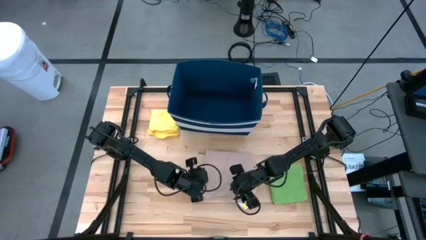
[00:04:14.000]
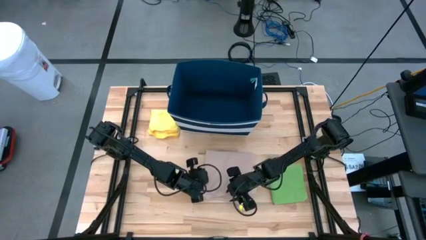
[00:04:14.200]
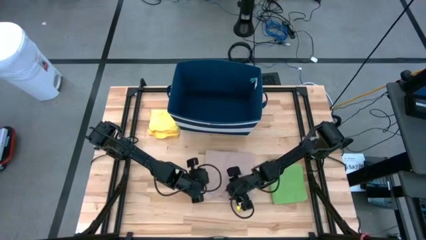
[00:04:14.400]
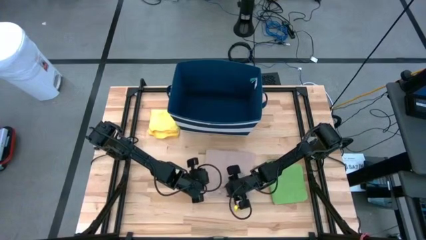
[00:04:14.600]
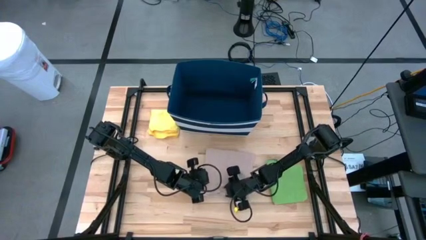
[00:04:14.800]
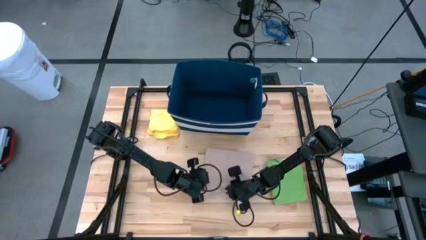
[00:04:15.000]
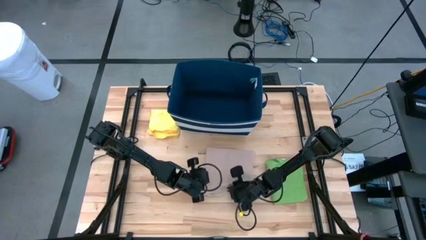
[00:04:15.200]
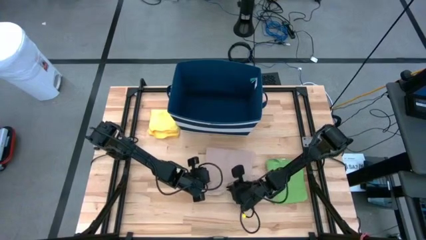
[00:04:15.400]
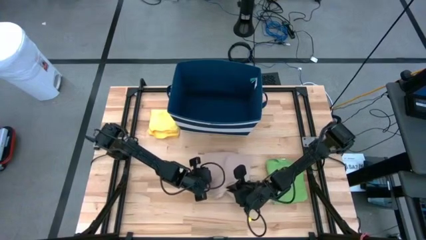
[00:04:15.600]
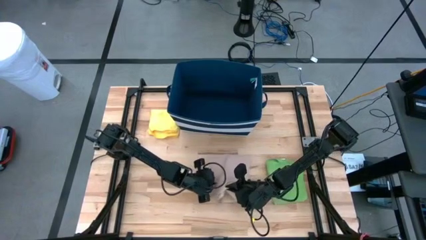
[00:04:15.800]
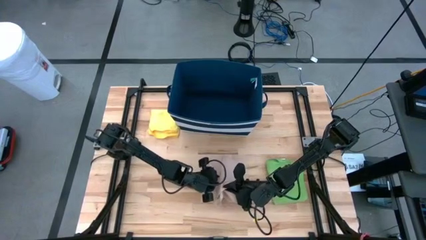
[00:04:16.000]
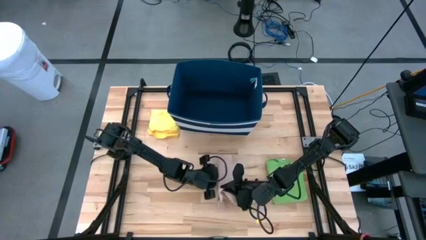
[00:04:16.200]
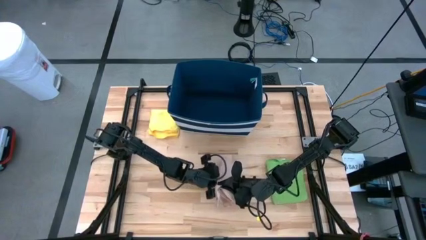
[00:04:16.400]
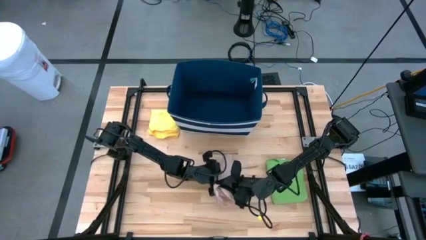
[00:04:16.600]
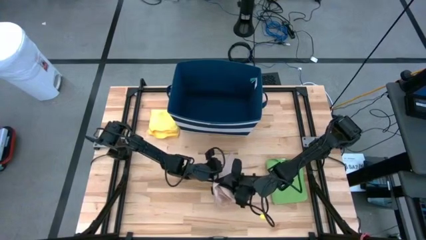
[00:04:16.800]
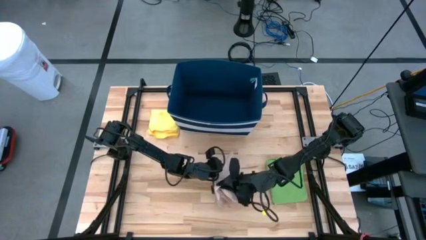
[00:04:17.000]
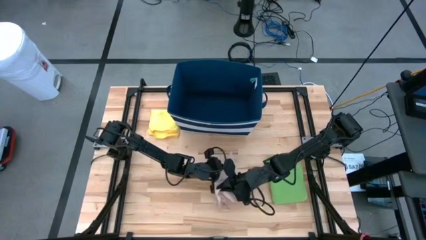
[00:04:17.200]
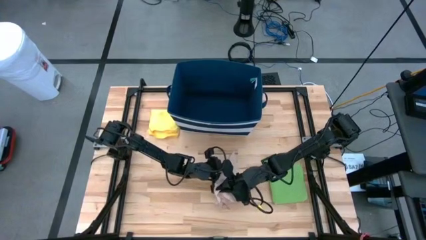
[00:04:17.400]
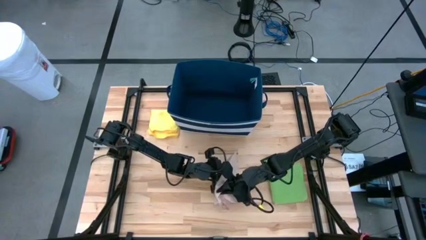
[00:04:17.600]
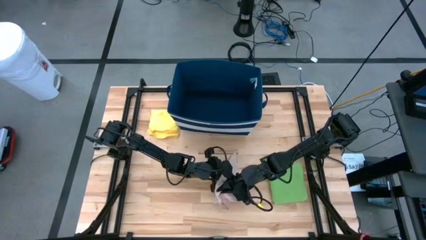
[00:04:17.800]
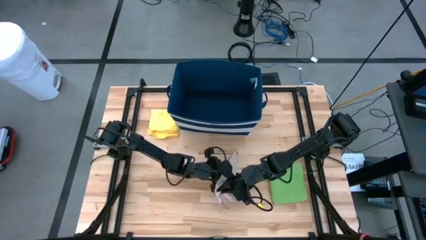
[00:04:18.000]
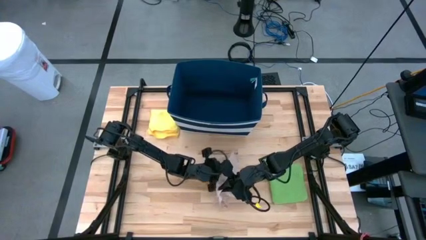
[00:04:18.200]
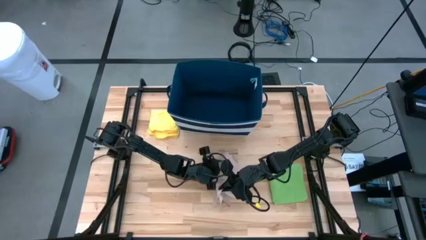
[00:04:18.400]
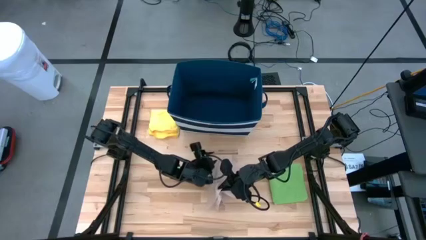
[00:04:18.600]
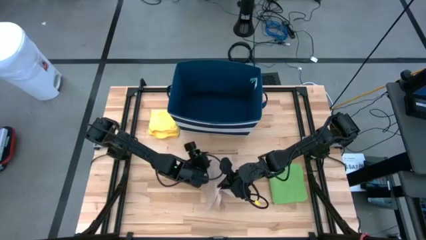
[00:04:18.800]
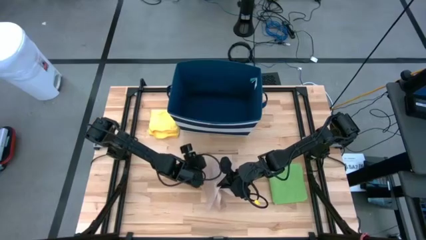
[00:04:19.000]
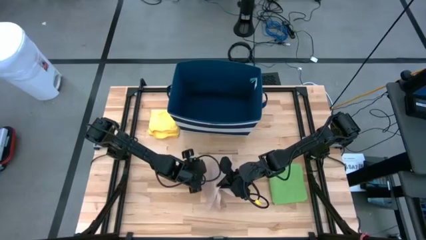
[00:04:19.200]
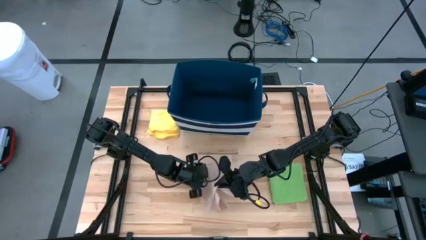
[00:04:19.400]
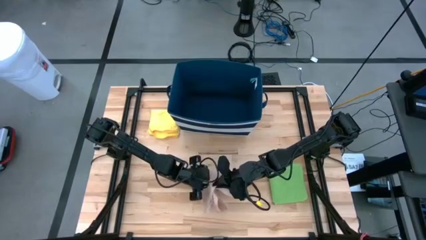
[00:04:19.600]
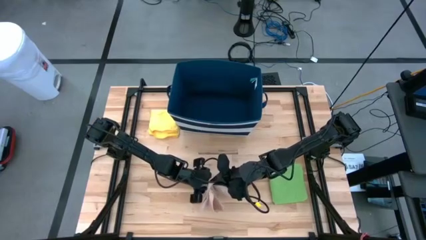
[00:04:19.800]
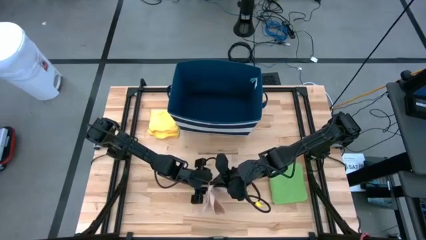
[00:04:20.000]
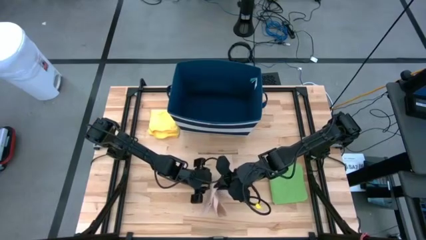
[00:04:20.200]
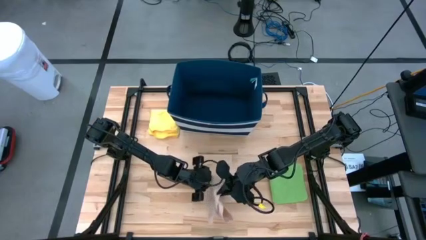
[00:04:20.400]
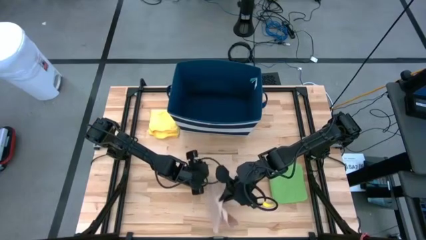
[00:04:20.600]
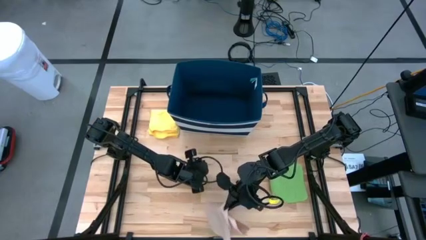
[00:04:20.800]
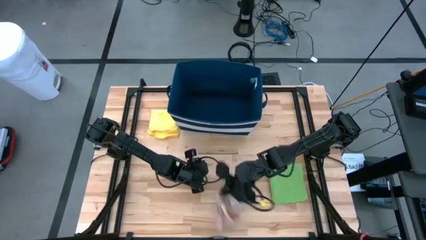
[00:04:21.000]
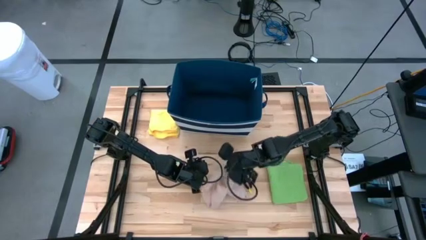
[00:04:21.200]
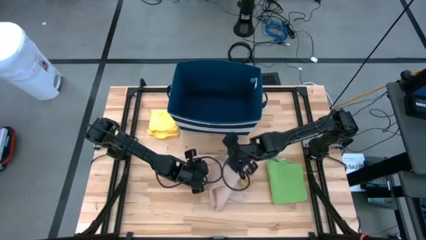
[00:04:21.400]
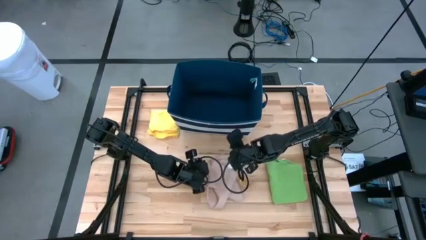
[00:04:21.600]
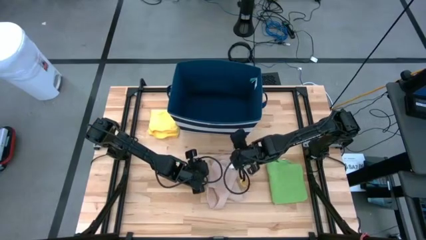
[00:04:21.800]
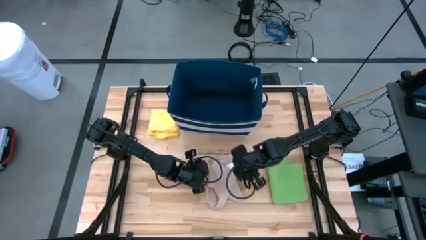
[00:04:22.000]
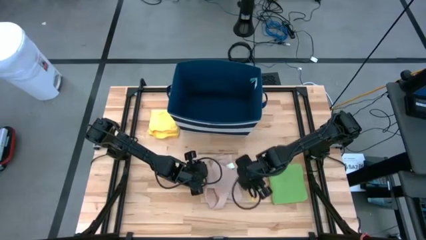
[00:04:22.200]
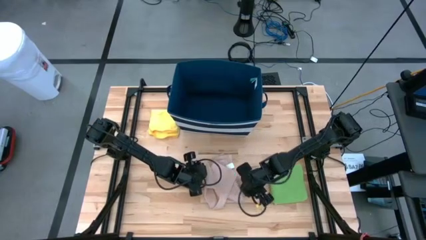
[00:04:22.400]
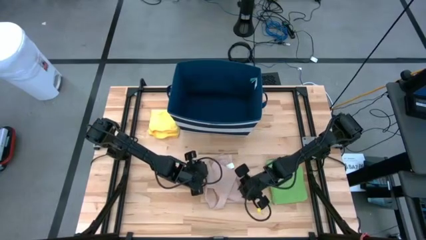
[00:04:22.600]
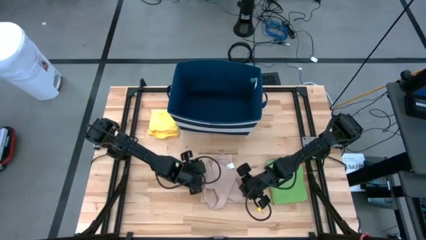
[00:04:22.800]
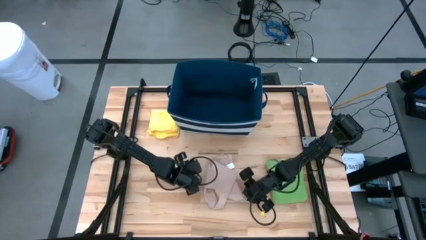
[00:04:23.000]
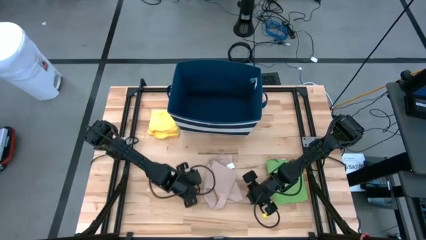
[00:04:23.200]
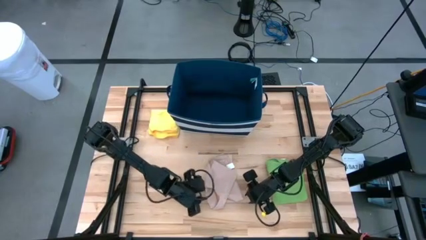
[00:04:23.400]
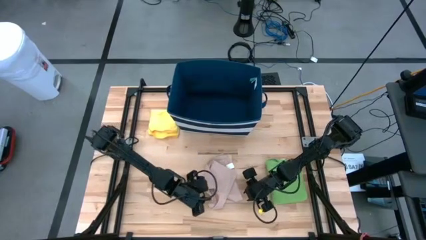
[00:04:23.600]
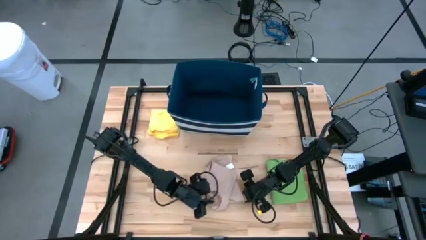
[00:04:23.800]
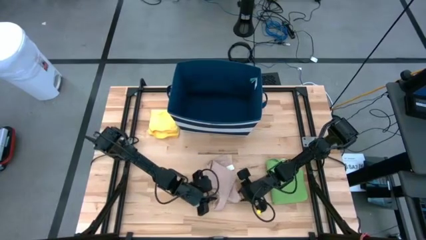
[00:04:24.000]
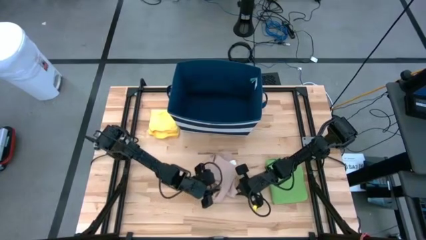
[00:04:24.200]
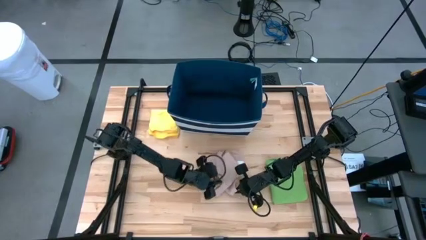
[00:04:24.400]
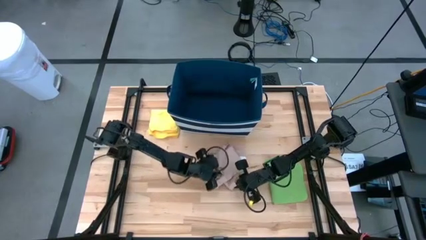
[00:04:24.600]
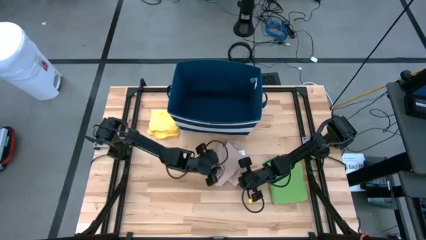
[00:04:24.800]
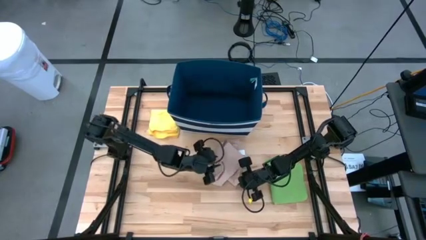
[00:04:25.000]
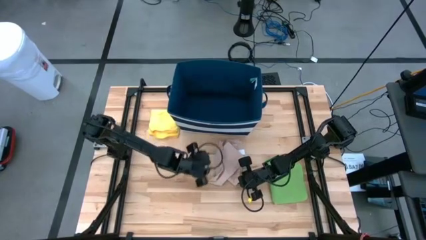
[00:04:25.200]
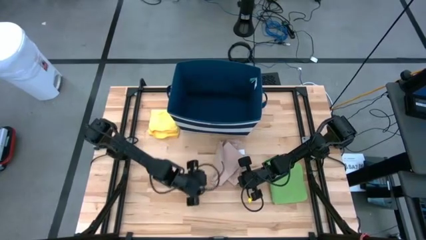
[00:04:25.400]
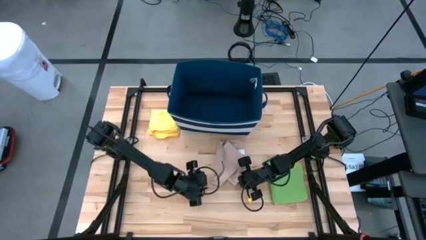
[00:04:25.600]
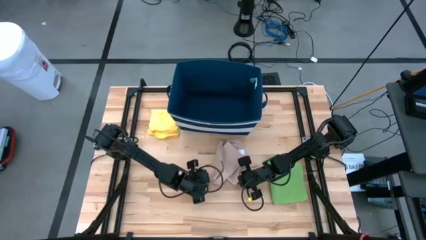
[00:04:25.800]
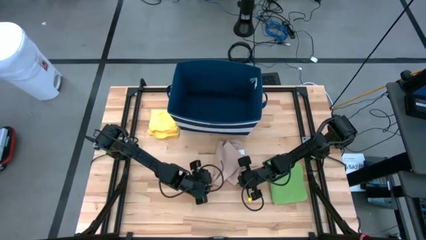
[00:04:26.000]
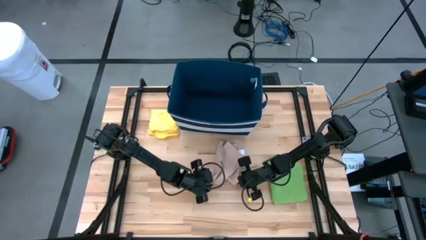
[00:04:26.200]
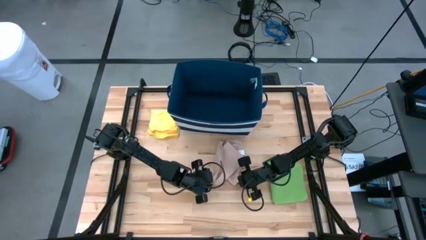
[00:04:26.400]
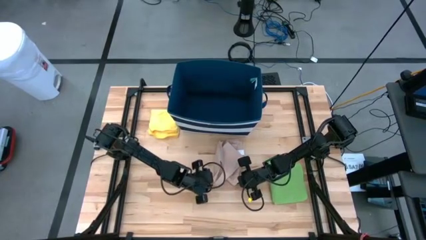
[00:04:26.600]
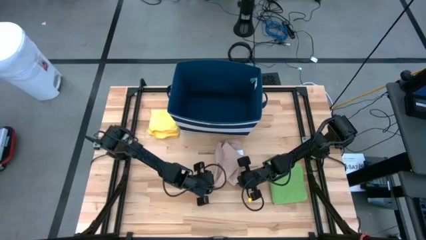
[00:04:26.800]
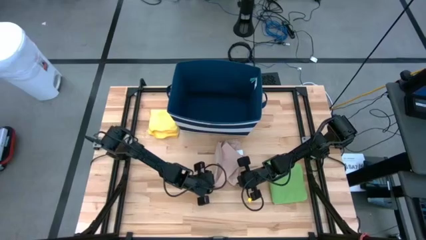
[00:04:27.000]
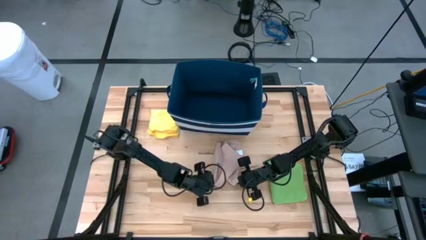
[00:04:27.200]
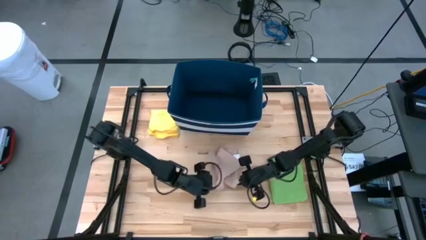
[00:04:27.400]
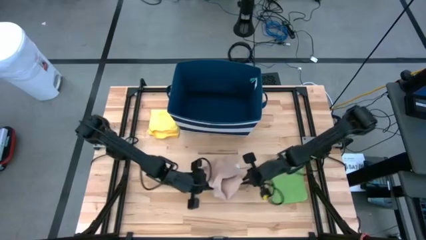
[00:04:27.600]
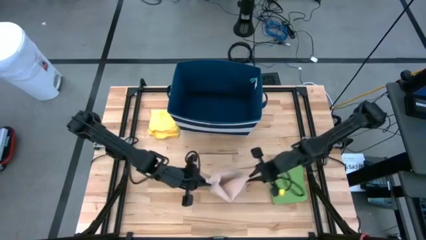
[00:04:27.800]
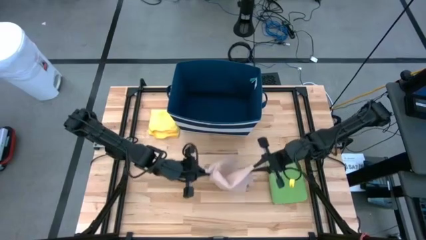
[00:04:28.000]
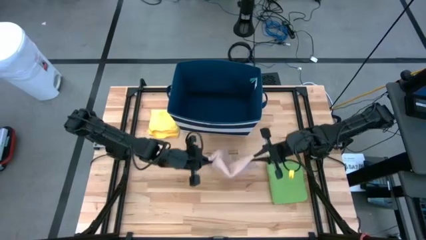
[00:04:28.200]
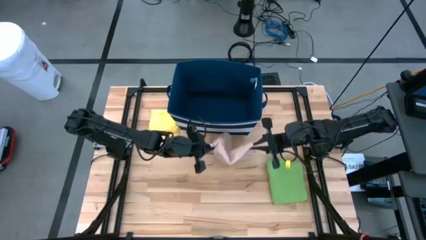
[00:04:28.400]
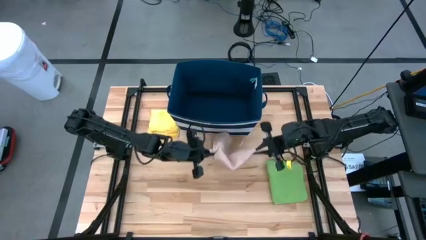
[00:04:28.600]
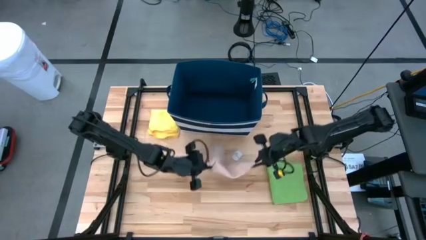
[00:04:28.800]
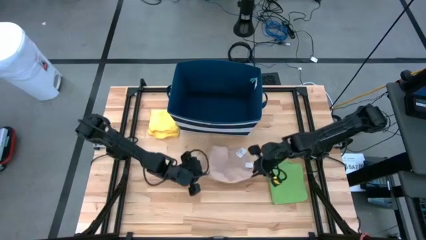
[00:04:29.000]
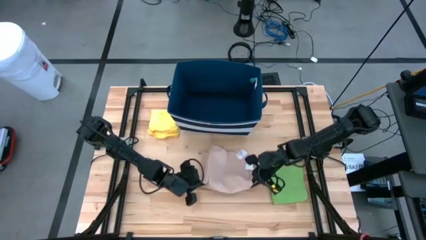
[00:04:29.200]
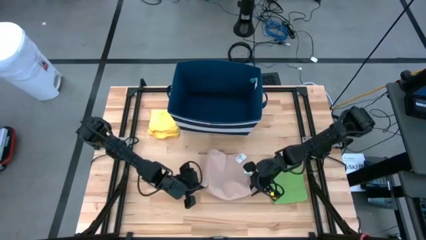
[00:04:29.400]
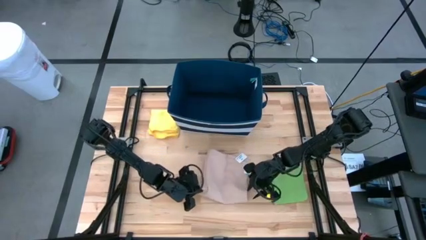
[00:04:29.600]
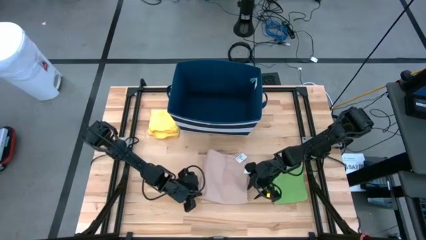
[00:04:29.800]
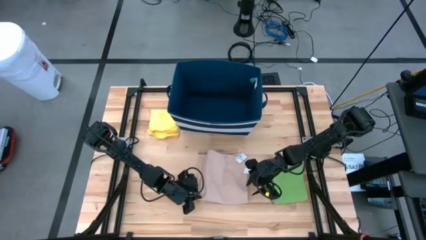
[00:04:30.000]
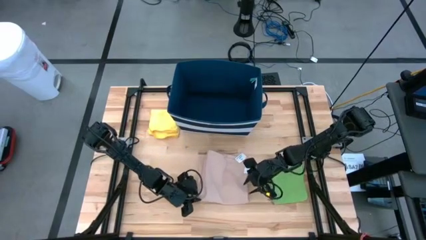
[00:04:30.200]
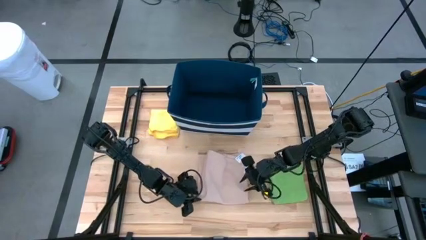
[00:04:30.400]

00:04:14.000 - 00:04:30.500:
Task: Fold towel
Fold the light pink towel
